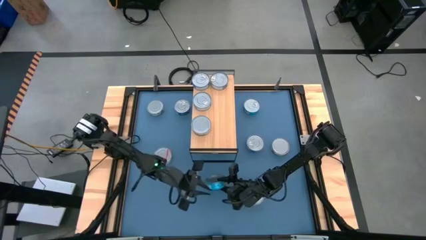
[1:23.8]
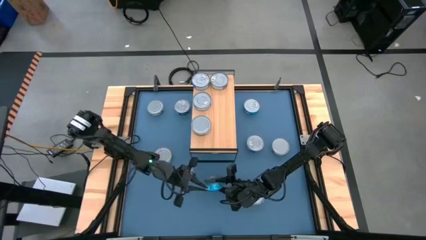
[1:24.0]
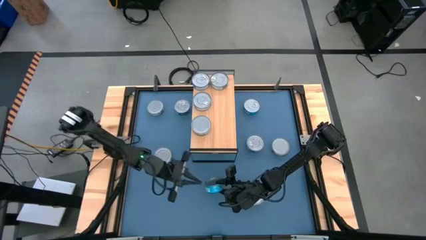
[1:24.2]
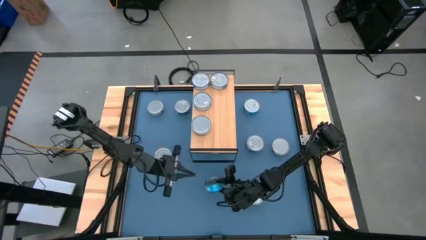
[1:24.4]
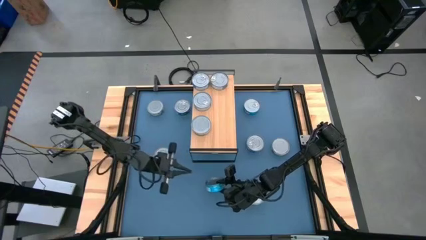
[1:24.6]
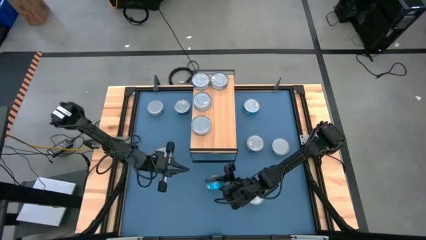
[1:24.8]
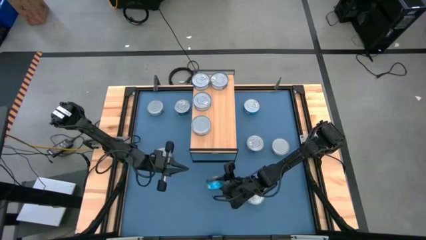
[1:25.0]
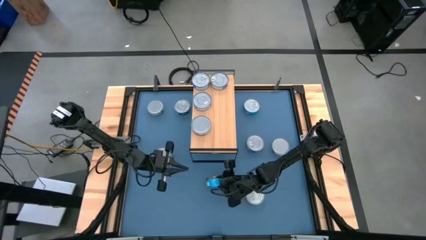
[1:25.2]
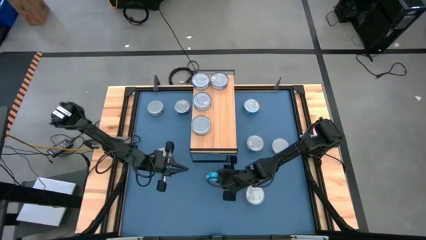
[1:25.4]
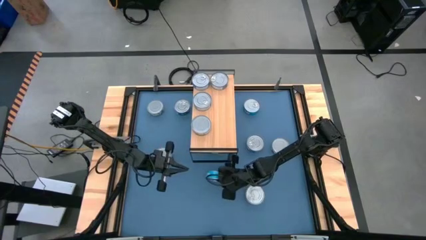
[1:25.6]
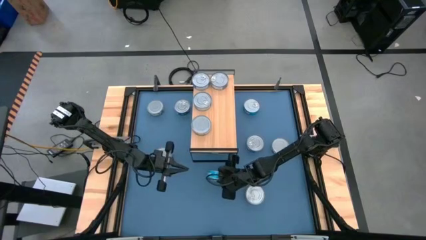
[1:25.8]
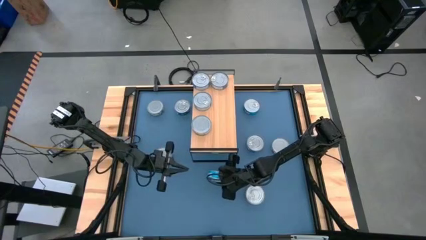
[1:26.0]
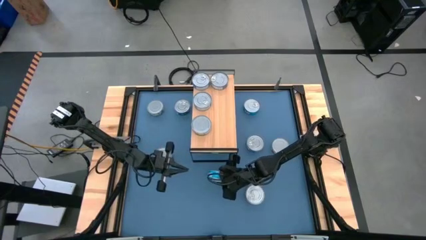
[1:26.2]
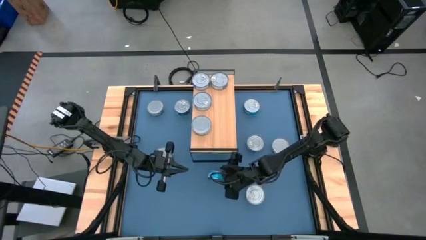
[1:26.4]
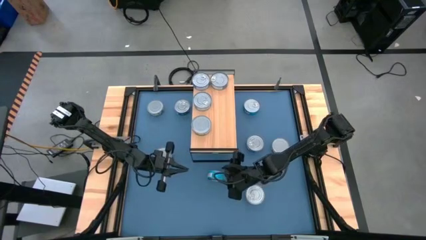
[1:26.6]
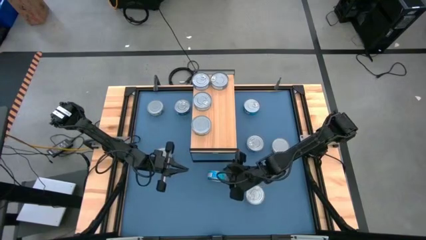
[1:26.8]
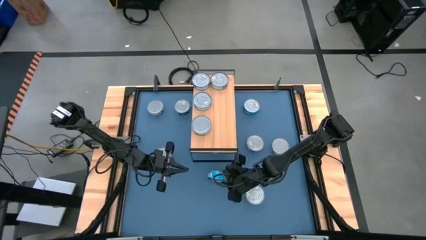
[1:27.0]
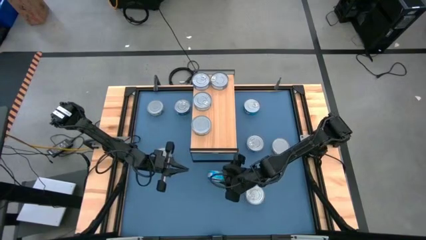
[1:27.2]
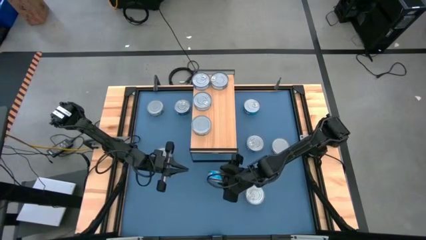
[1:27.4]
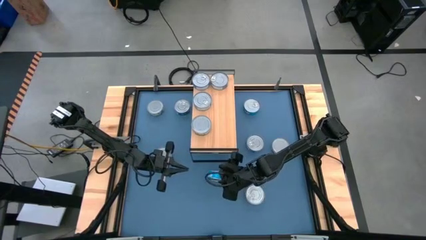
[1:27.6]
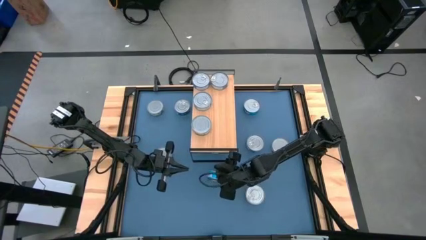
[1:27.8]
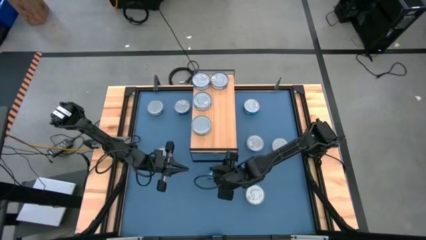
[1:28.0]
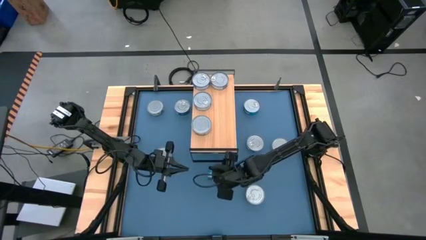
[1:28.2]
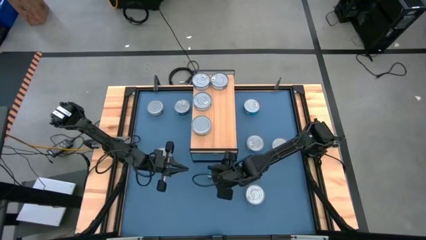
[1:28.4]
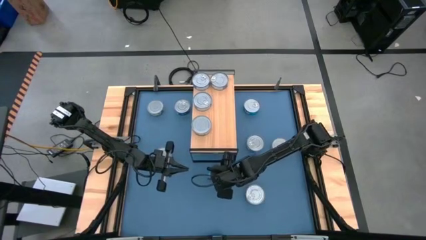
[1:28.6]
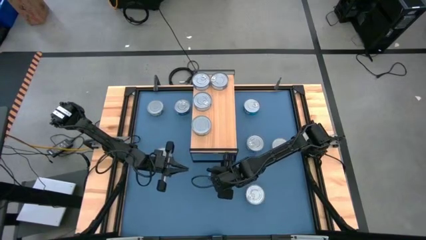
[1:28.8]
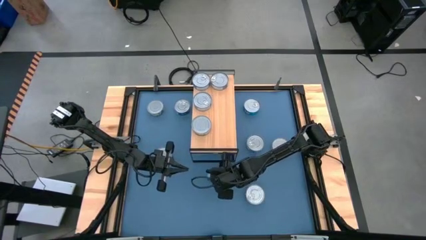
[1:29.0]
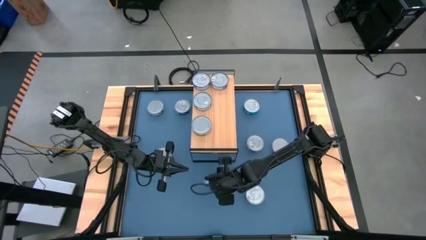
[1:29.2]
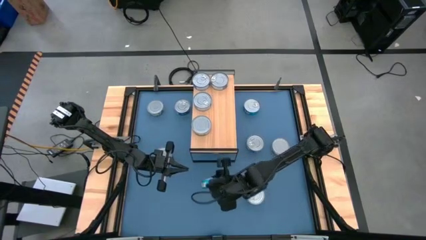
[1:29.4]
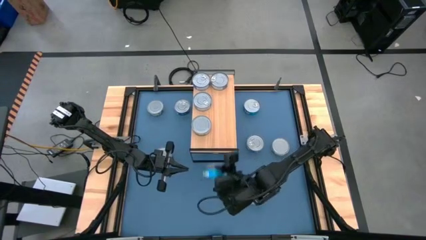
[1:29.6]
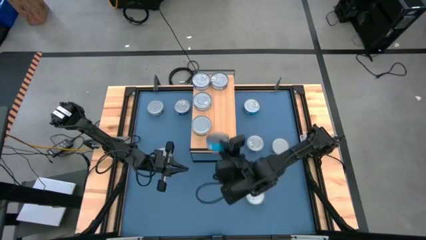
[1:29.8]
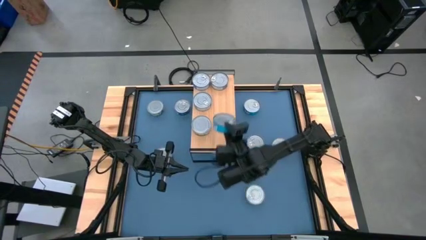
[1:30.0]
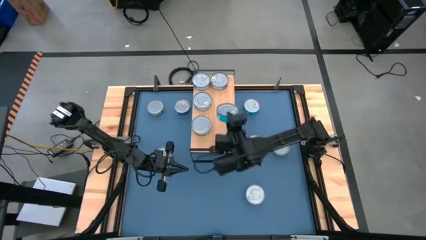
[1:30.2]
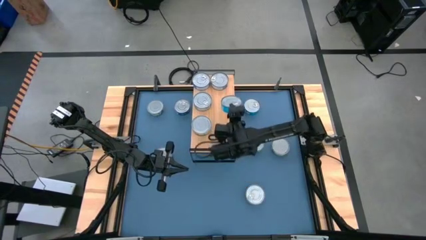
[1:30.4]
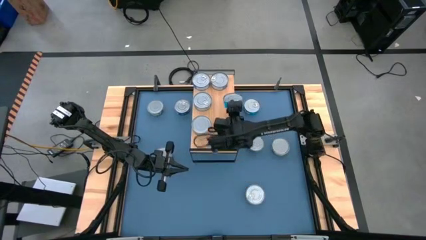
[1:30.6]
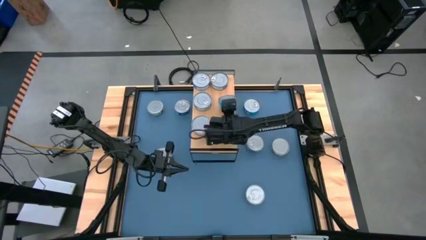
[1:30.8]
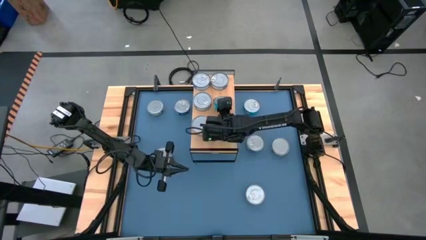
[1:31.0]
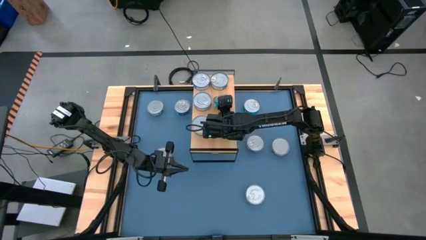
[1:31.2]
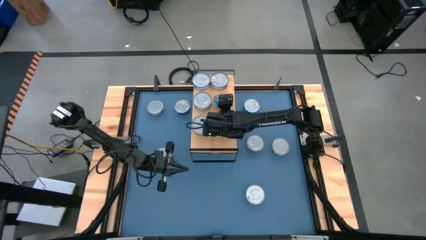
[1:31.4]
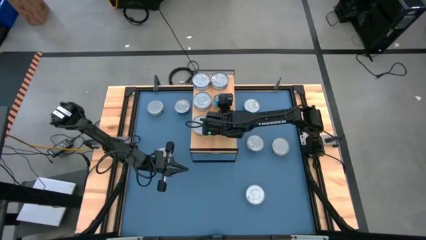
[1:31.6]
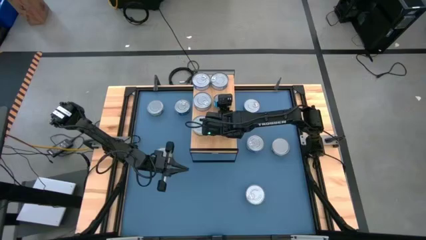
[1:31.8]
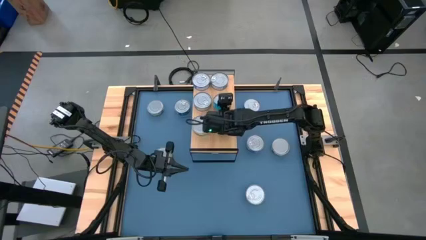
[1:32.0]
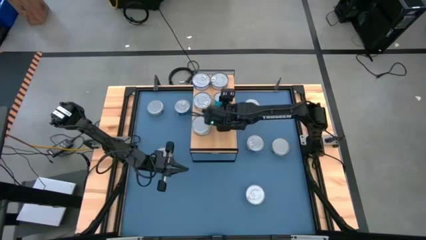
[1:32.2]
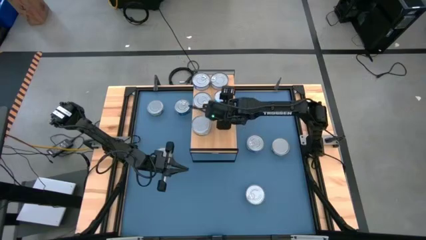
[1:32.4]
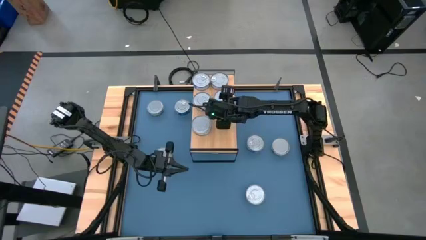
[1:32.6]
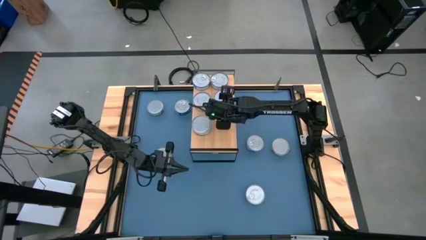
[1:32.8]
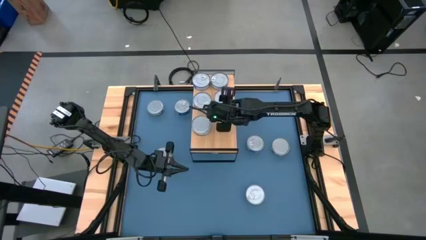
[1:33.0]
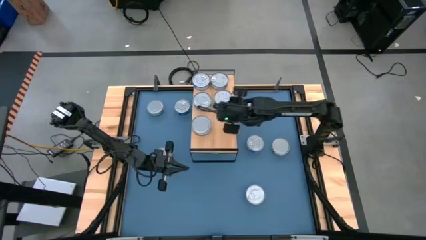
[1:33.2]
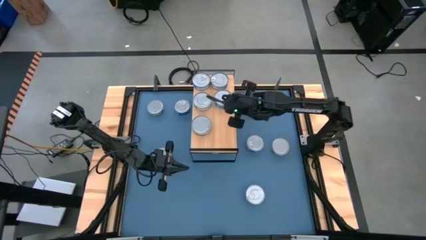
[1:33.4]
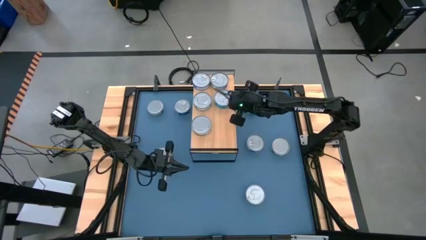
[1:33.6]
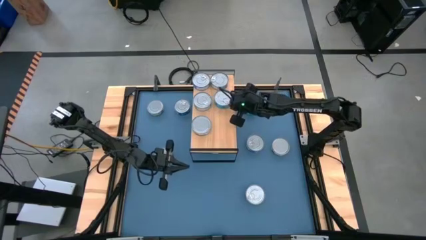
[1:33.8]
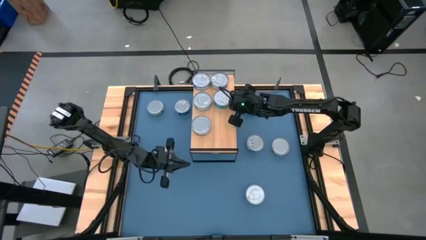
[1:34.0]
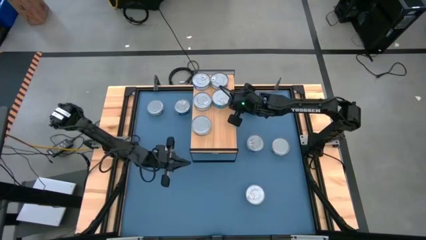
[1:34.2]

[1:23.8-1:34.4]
Task: Stack canned seafood by type on shelf
Put the yellow-blue tuna can on the shelf

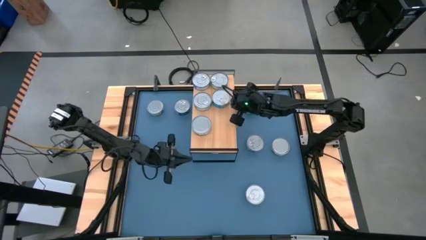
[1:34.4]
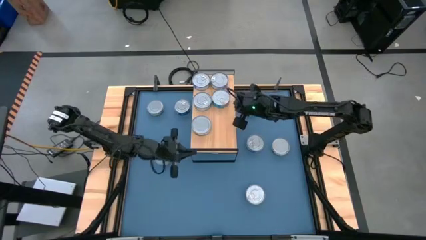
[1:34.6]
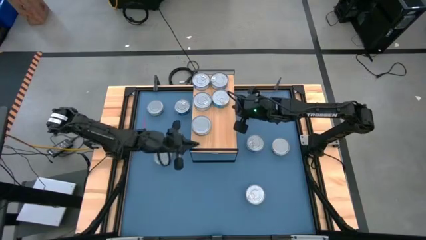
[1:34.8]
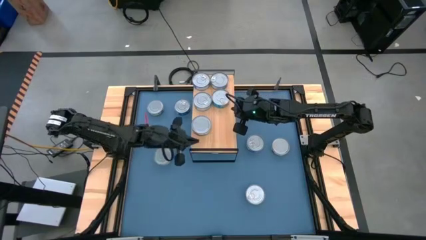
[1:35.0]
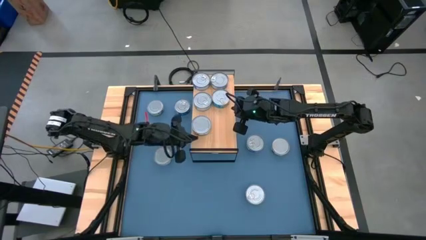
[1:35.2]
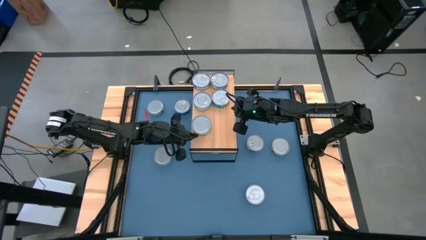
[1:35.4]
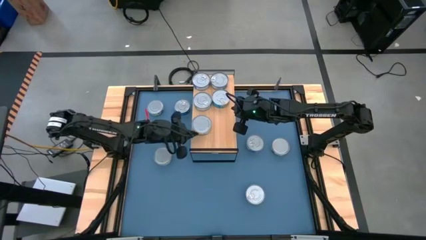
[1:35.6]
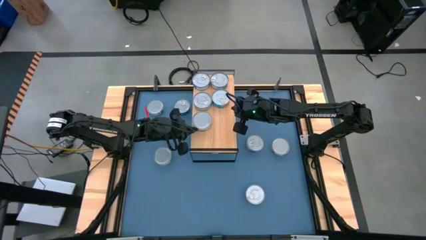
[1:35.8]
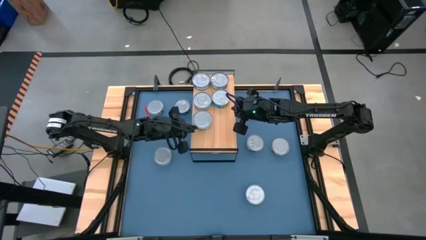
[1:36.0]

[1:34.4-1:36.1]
Adjust the green tuna can on the shelf

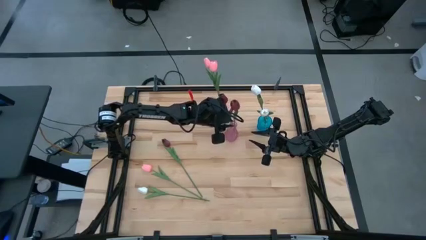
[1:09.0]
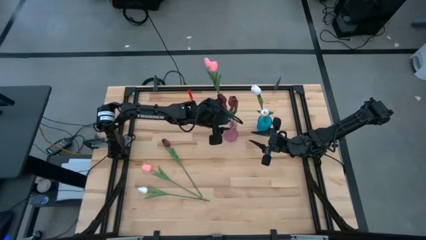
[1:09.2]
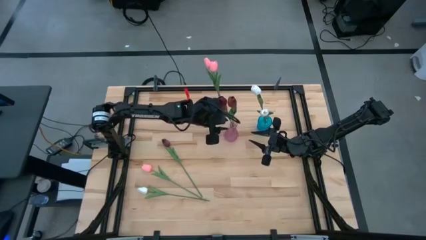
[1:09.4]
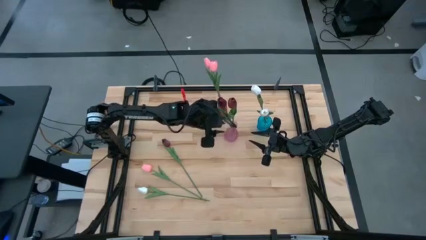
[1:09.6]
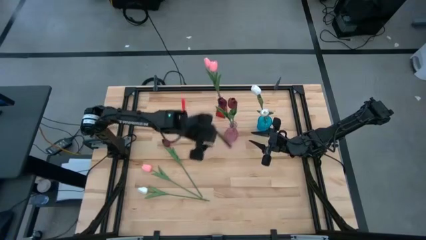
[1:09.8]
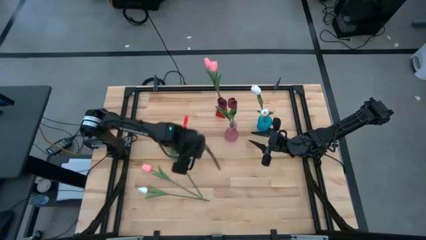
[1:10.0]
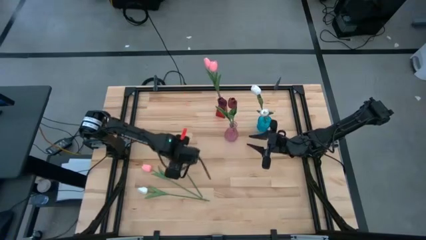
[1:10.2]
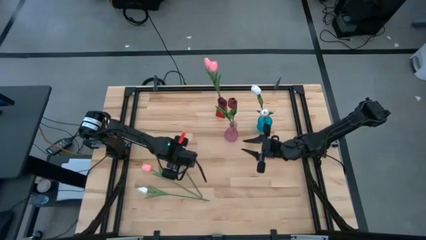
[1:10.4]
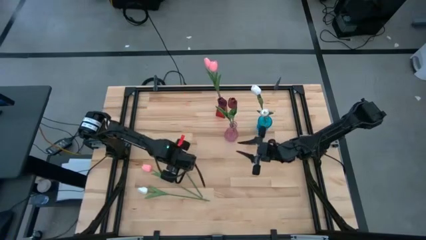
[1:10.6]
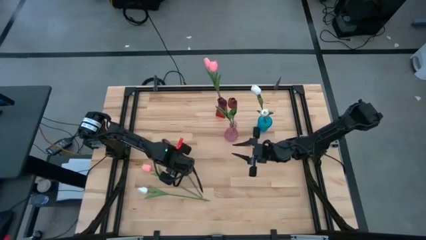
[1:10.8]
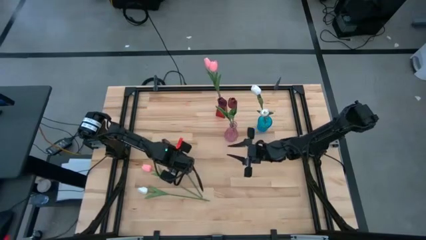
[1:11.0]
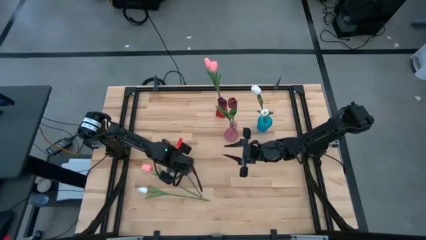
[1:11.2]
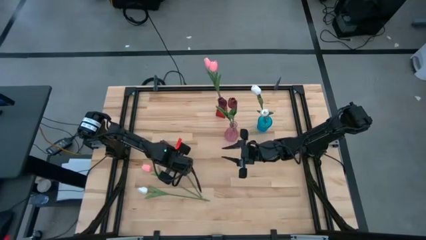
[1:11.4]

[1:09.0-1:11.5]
Task: Sort flowers into vase by color
Put the red flower into the pink vase
